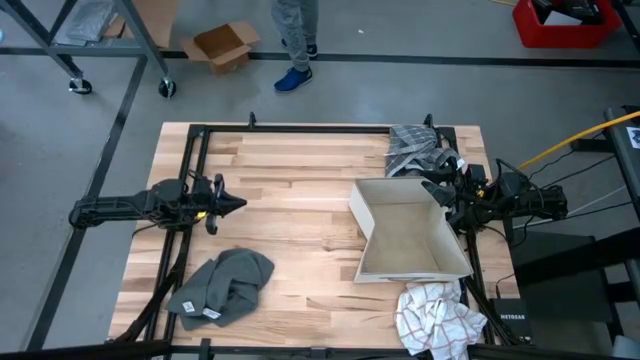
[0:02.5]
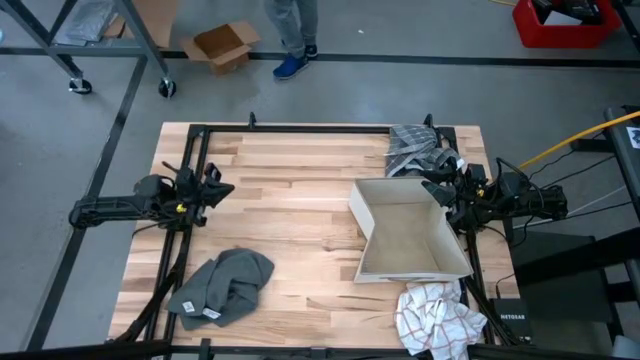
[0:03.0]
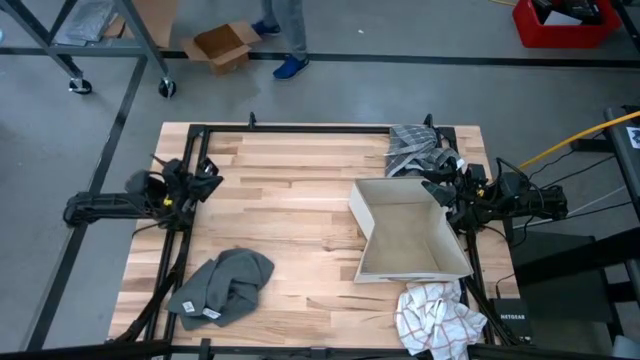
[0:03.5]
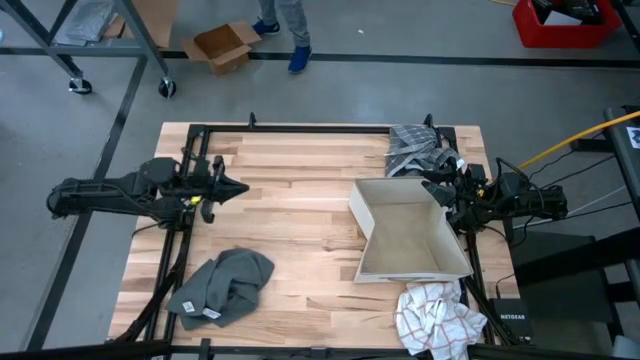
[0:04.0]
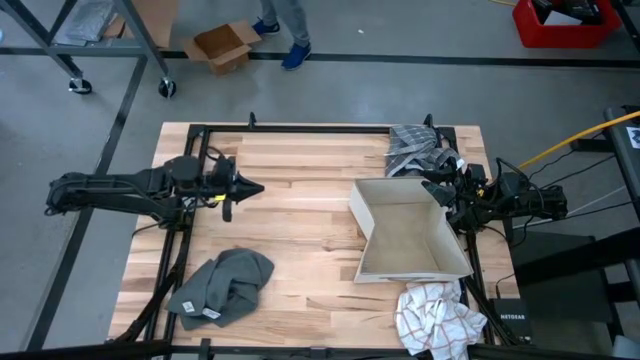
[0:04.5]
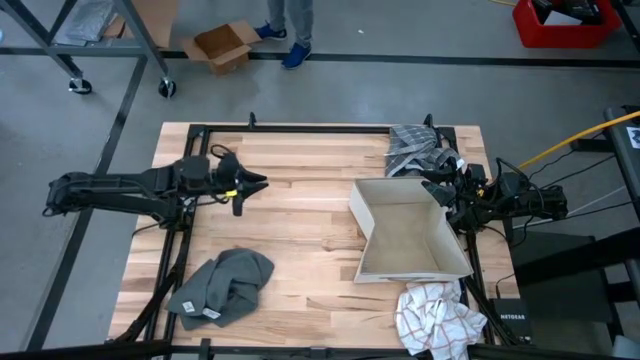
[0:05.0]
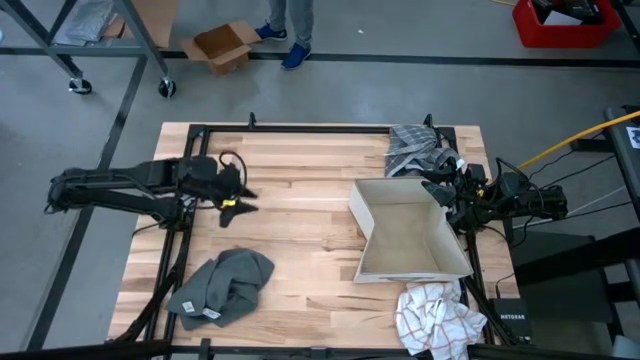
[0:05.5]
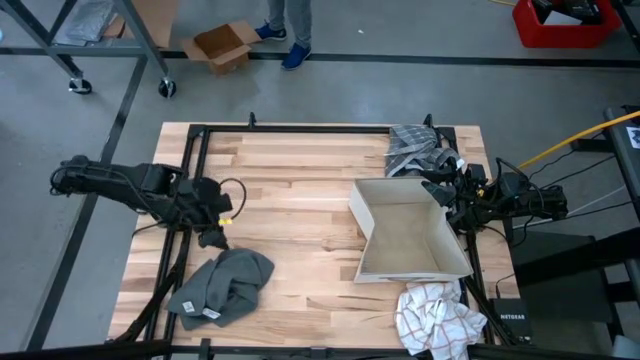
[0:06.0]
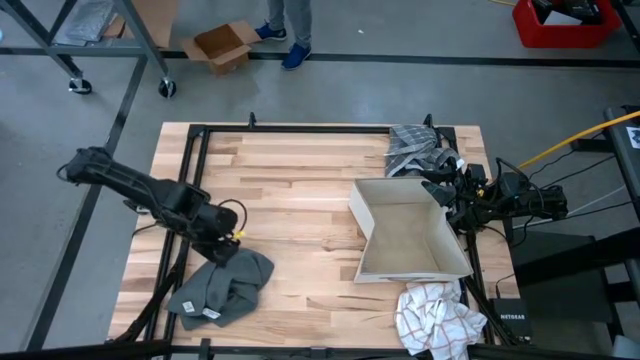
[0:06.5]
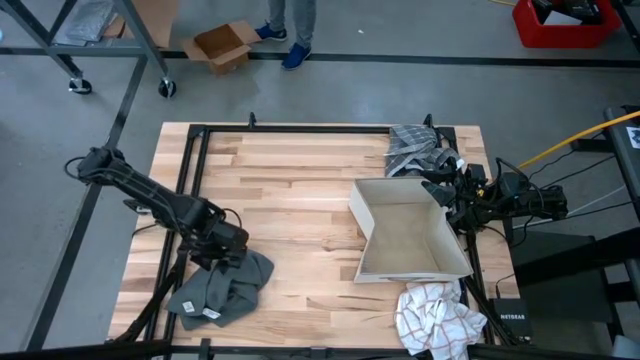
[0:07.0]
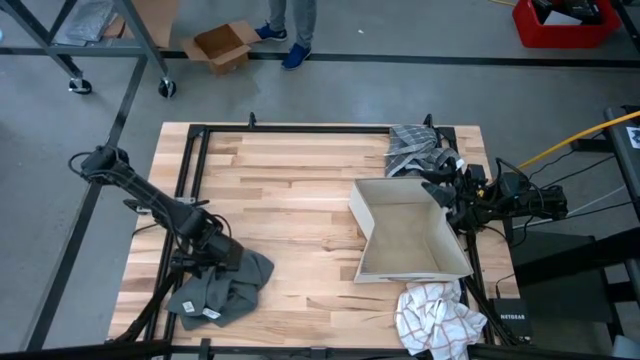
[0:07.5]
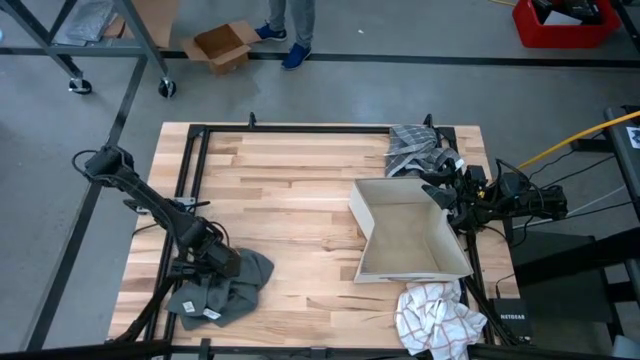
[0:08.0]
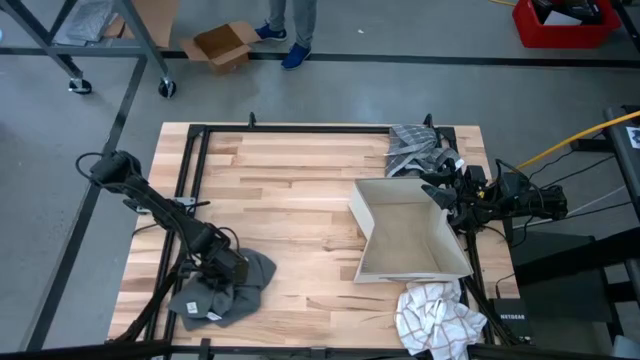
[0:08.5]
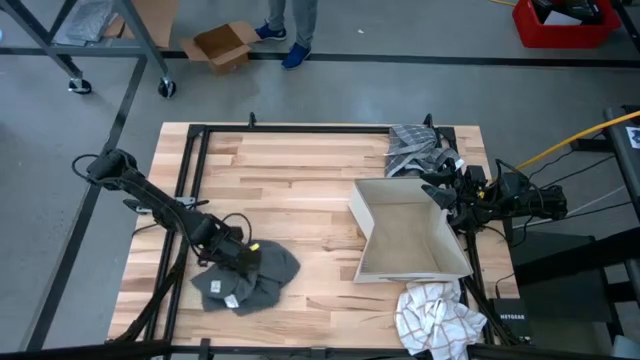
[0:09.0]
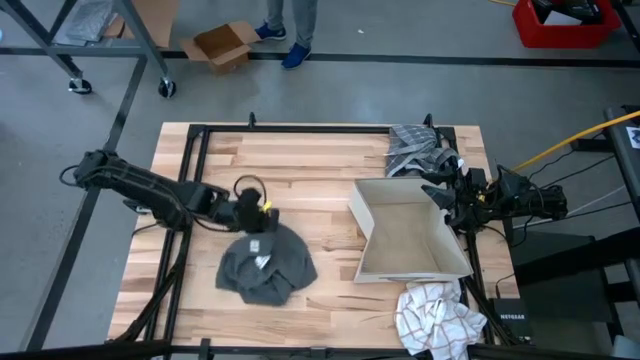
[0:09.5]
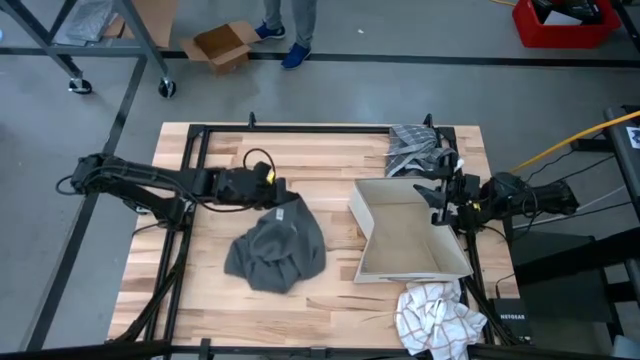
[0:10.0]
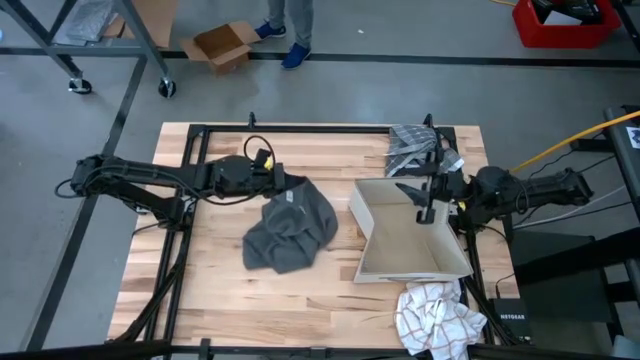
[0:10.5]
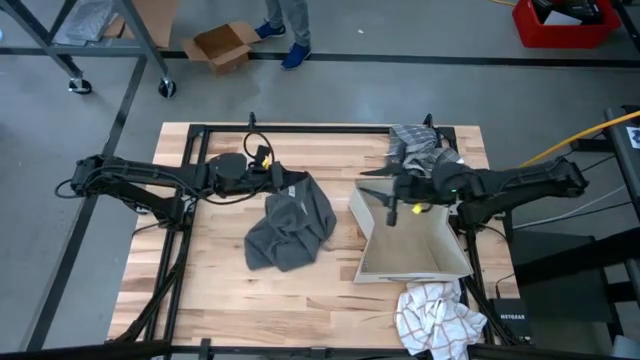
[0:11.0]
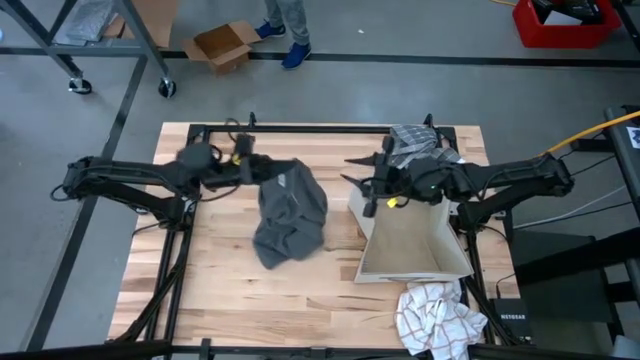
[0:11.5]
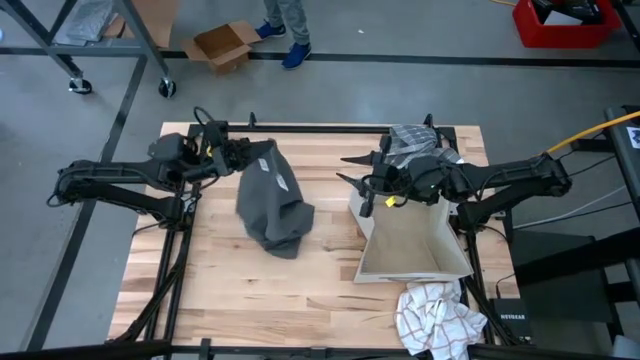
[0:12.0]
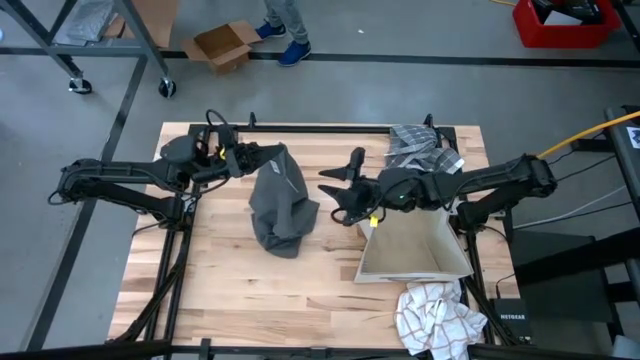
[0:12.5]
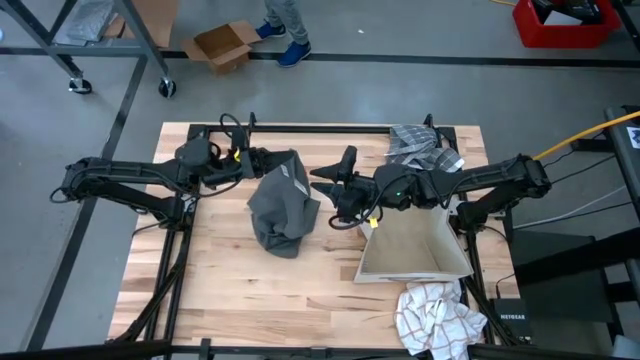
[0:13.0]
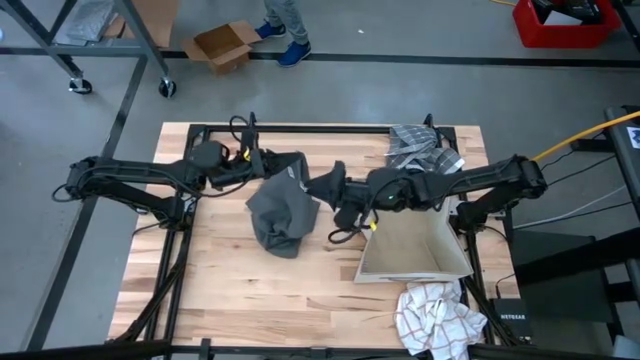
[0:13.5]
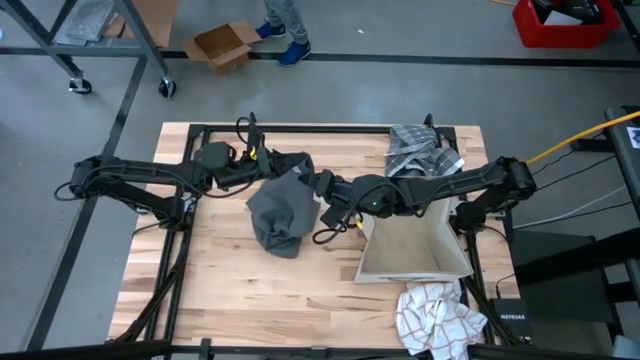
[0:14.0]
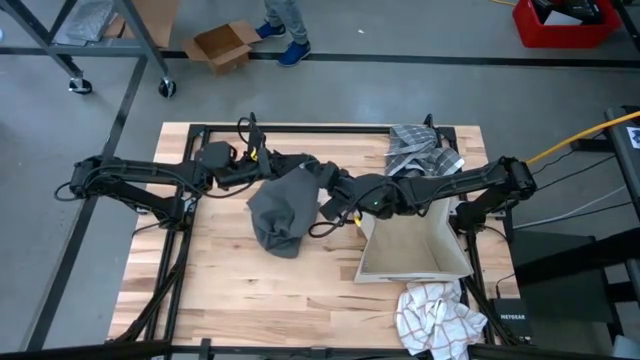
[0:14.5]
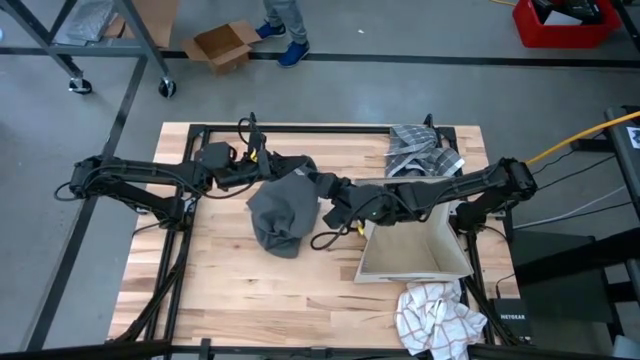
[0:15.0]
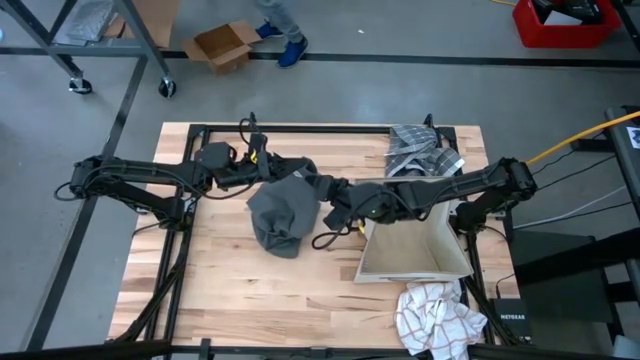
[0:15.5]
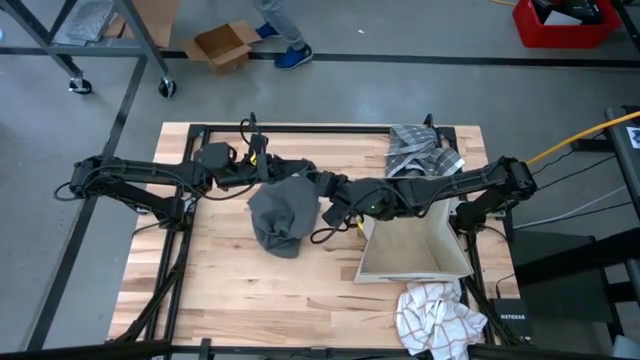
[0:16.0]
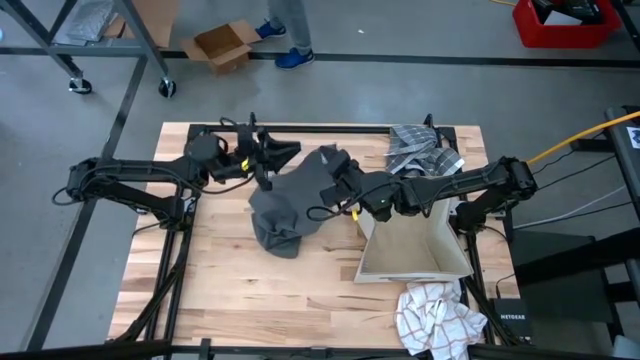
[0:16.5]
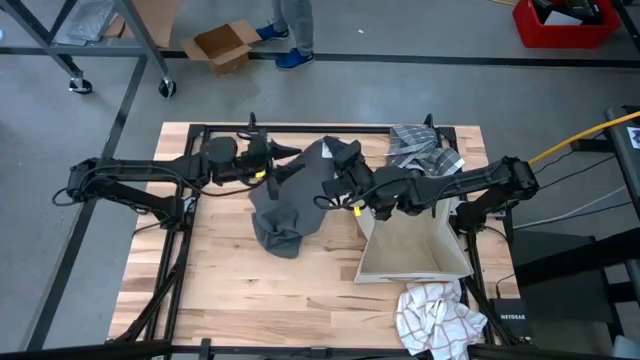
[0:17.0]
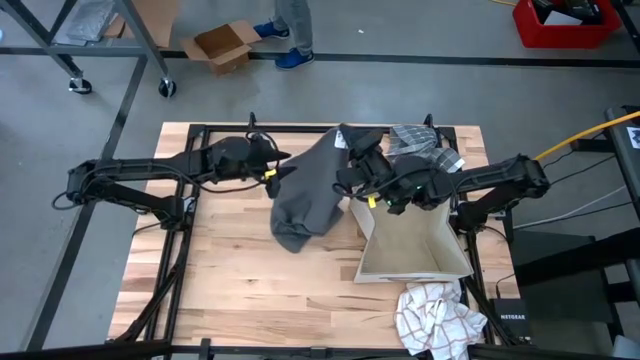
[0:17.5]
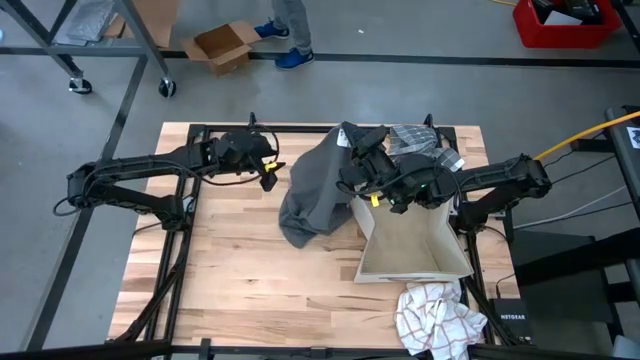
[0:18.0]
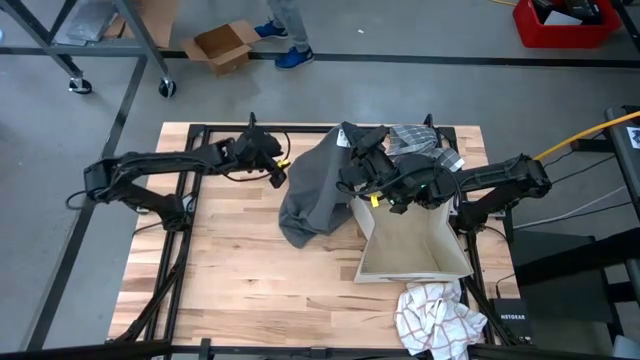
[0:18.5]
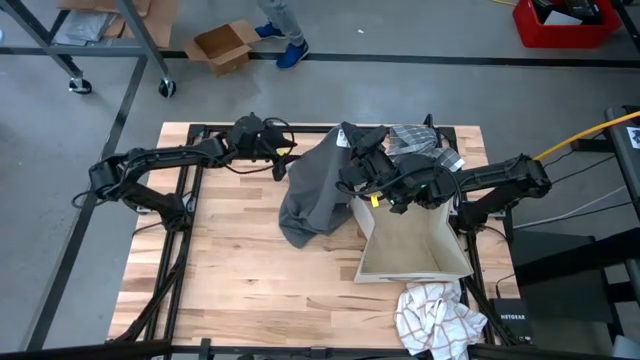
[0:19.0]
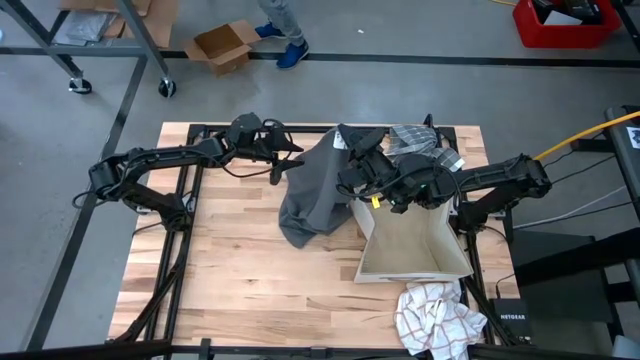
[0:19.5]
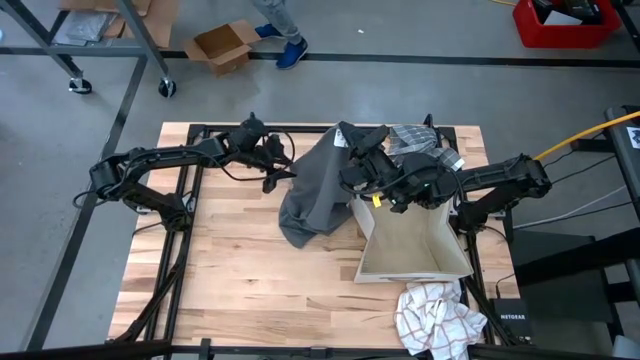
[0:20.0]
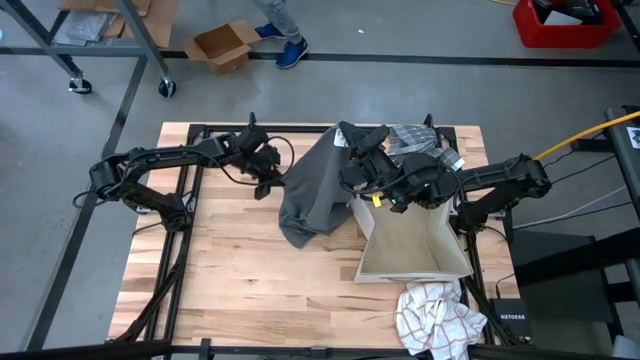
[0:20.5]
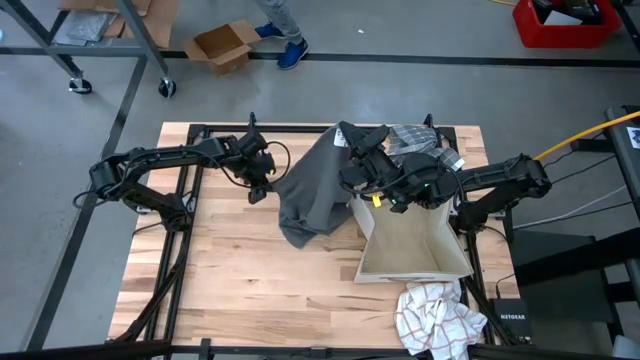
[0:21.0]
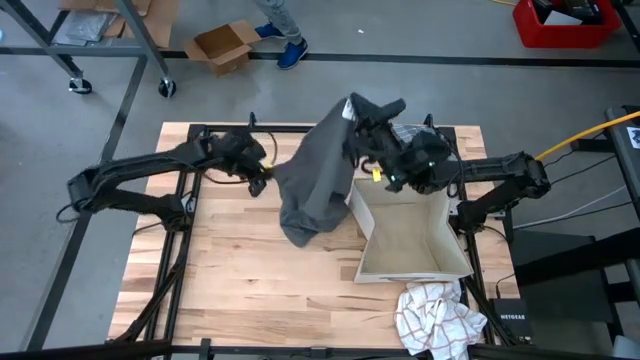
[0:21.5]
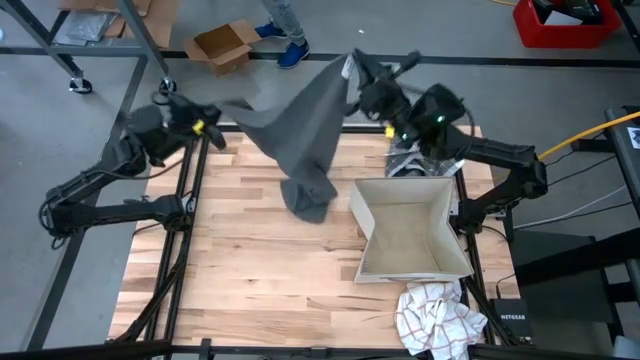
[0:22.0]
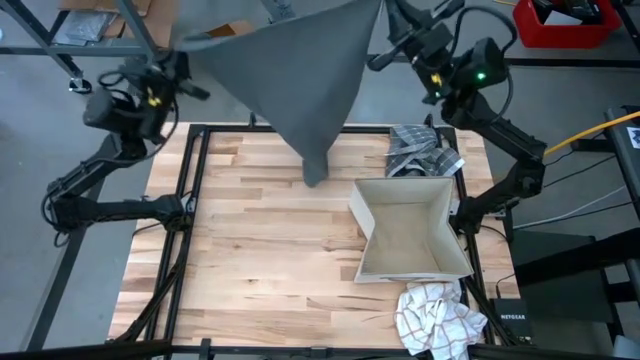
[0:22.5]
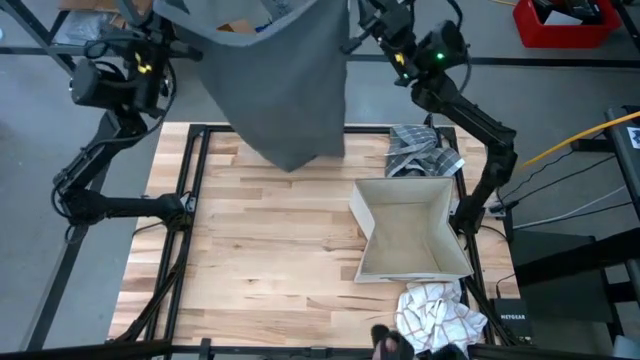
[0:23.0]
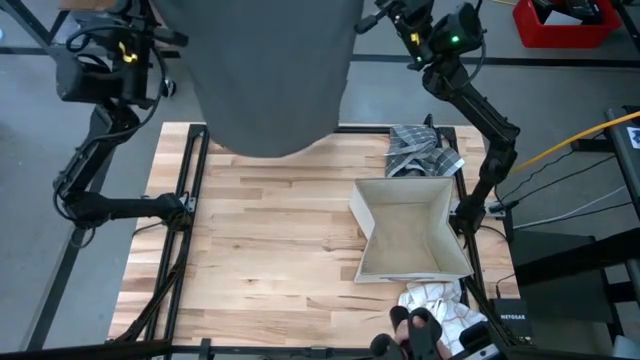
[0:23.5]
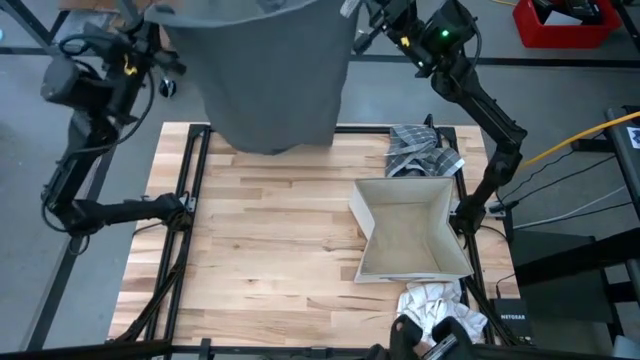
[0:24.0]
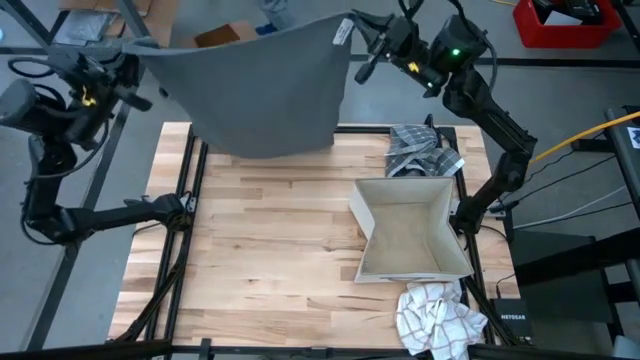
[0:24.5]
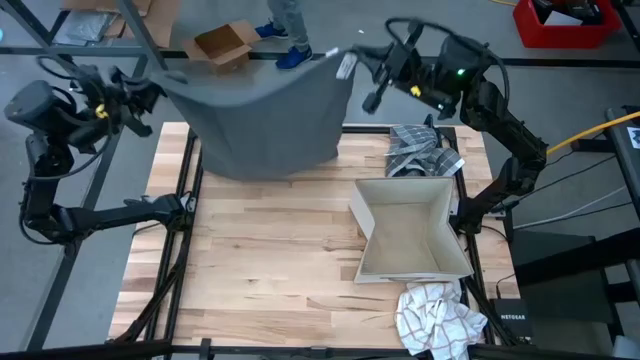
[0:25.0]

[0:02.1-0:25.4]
Task: Fold towel
Fold the gray towel
